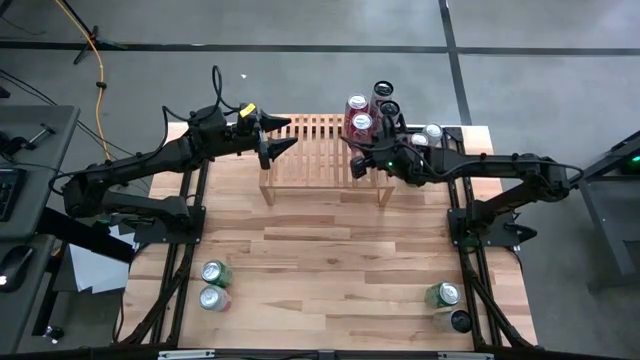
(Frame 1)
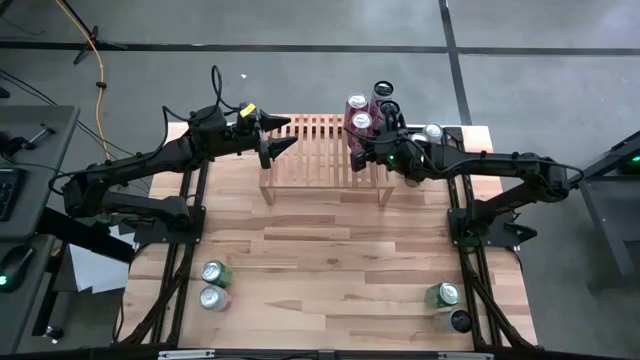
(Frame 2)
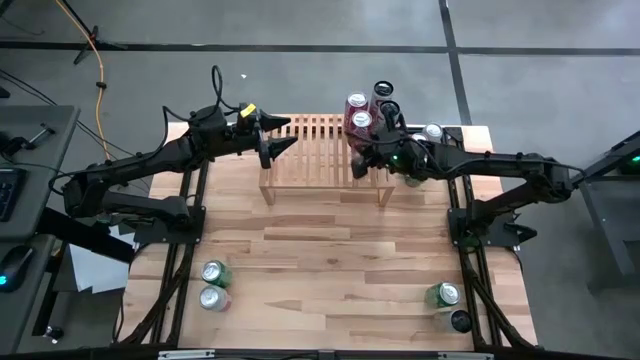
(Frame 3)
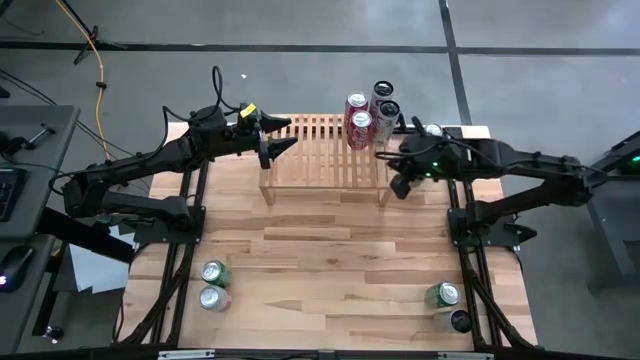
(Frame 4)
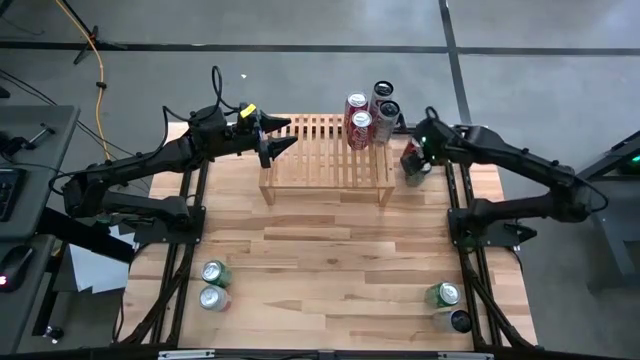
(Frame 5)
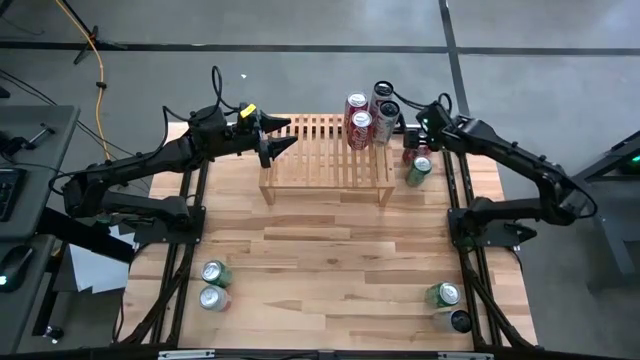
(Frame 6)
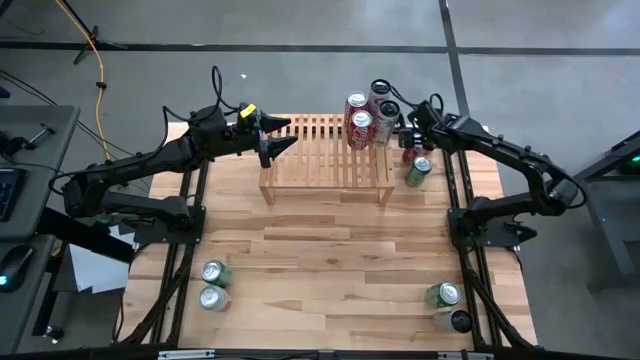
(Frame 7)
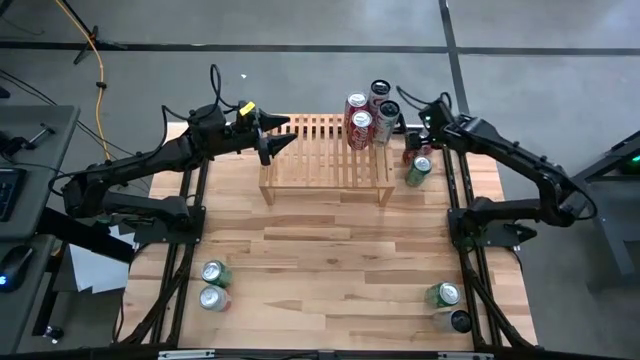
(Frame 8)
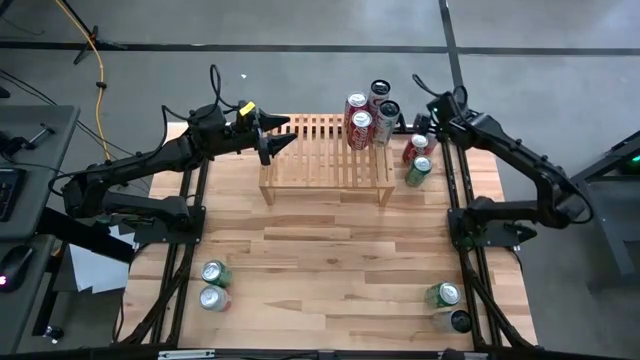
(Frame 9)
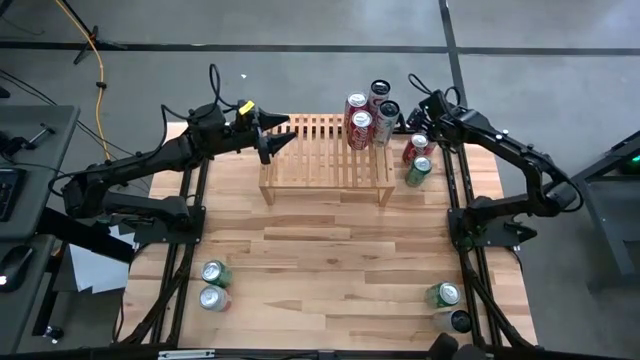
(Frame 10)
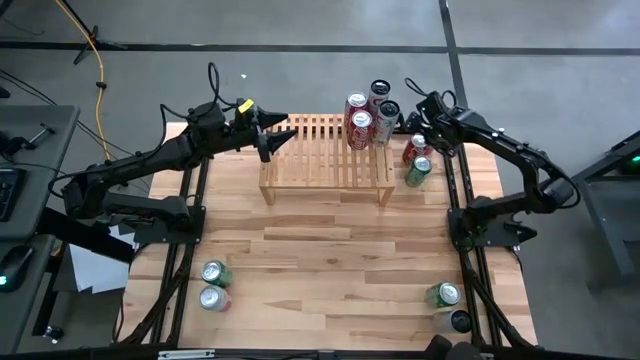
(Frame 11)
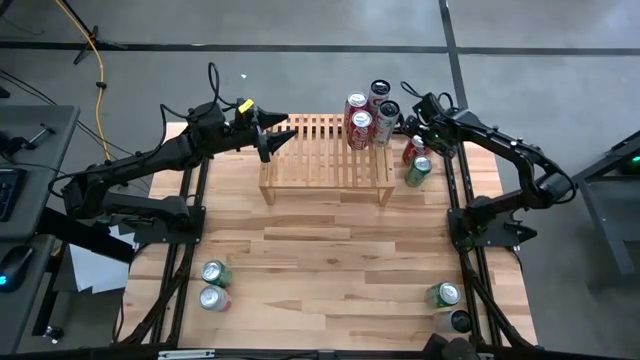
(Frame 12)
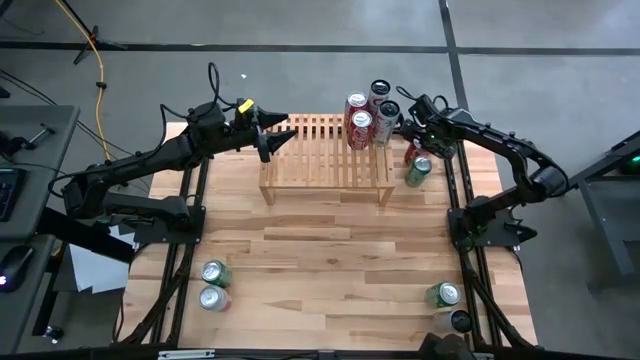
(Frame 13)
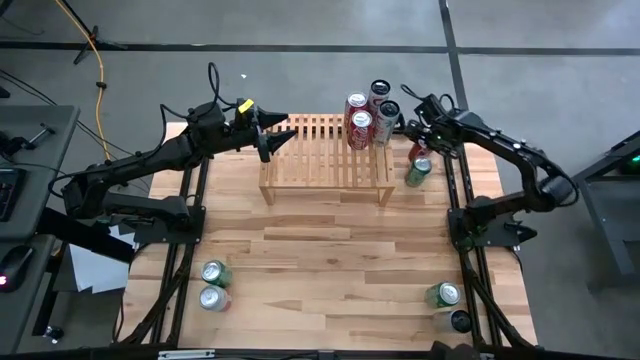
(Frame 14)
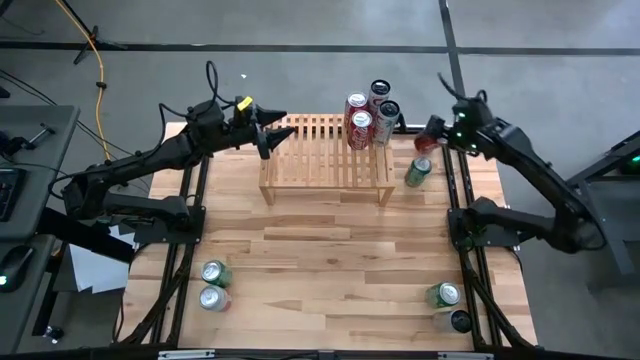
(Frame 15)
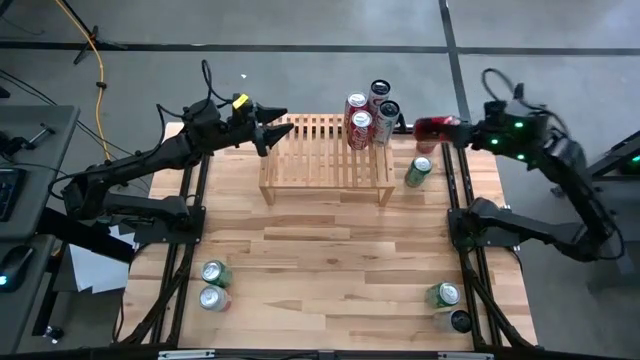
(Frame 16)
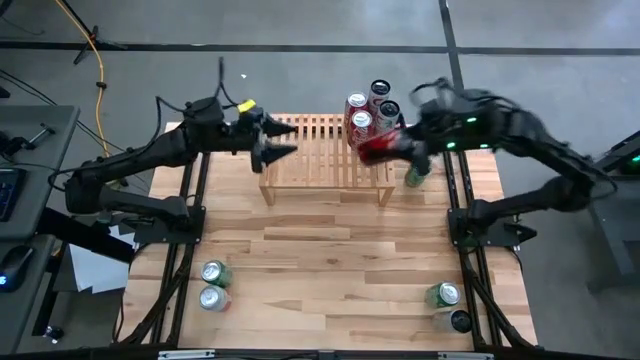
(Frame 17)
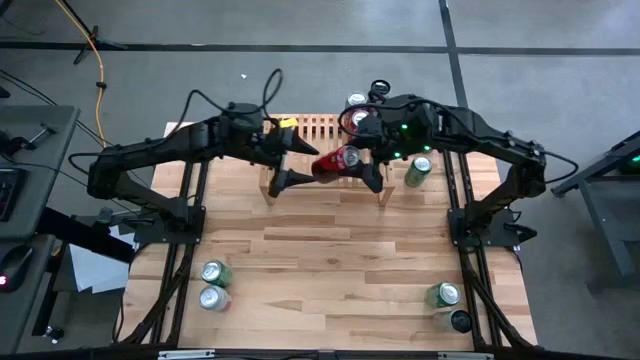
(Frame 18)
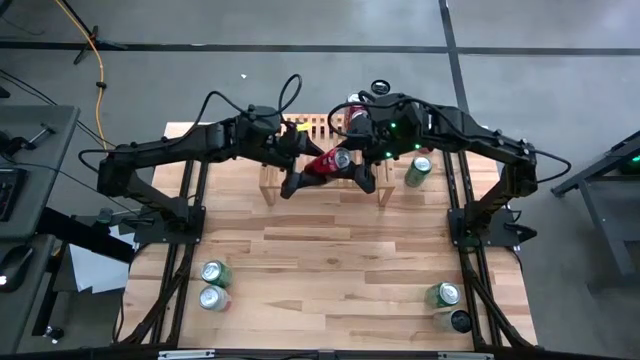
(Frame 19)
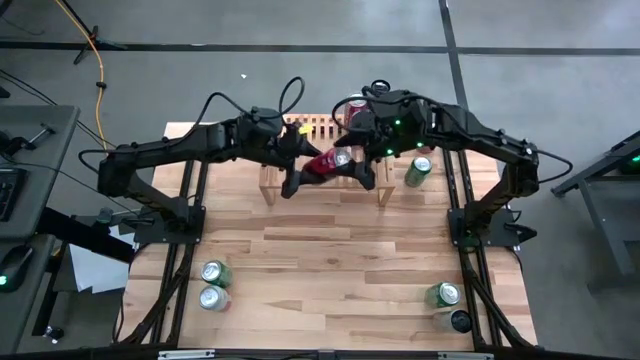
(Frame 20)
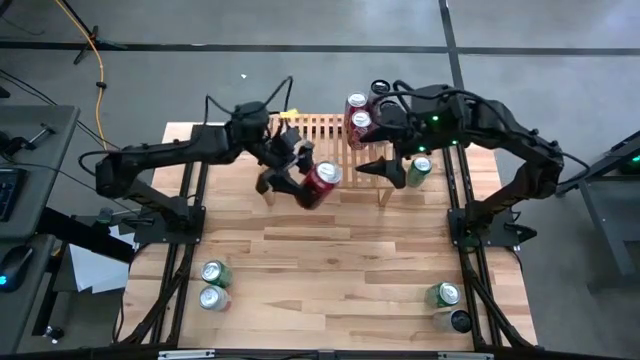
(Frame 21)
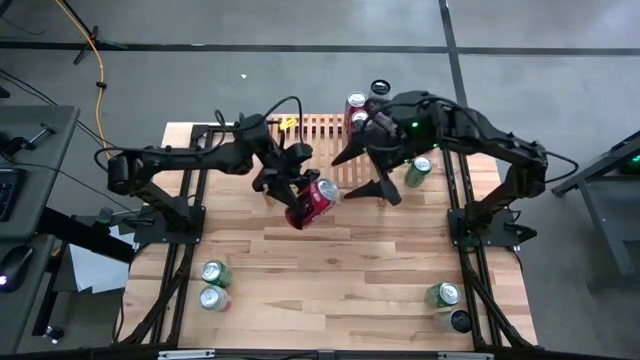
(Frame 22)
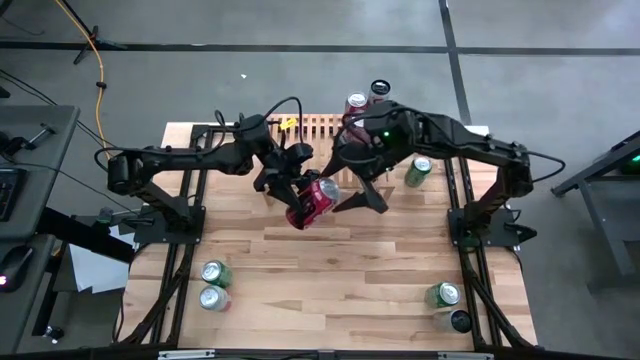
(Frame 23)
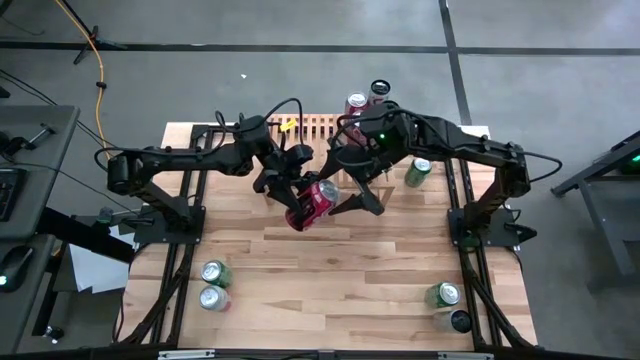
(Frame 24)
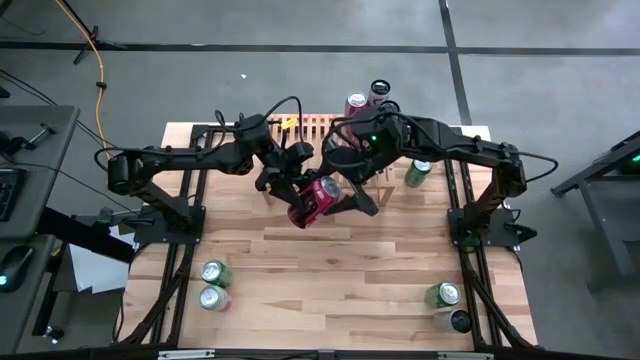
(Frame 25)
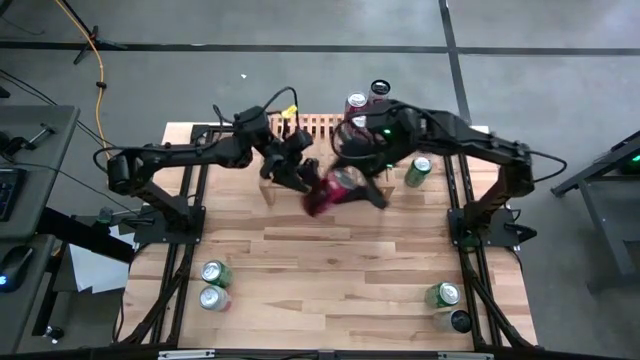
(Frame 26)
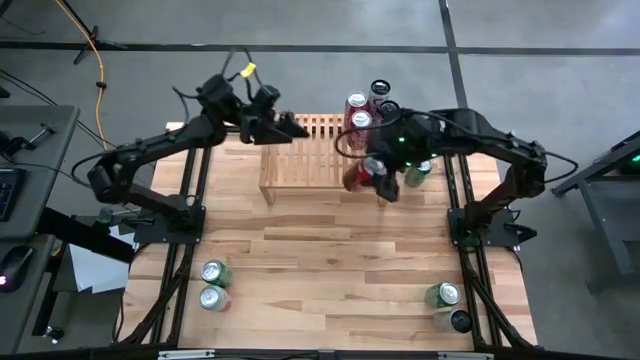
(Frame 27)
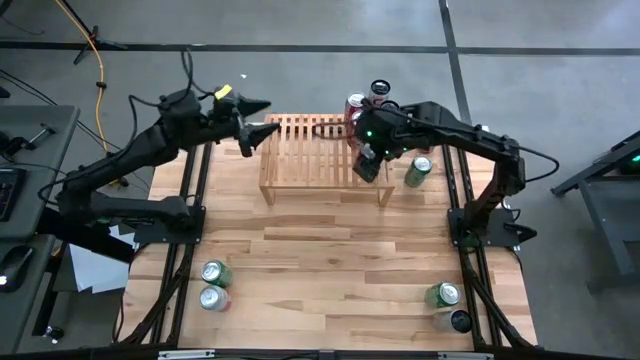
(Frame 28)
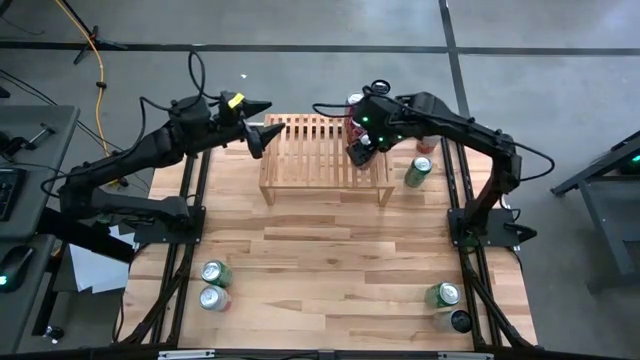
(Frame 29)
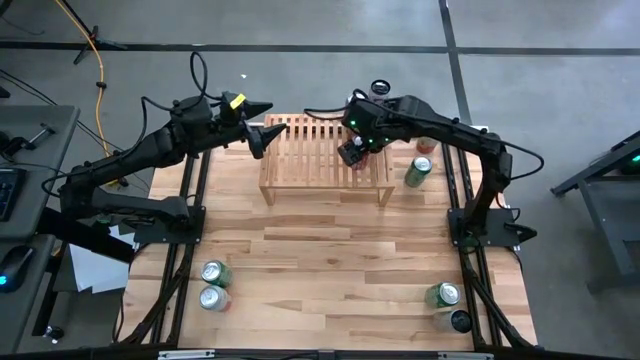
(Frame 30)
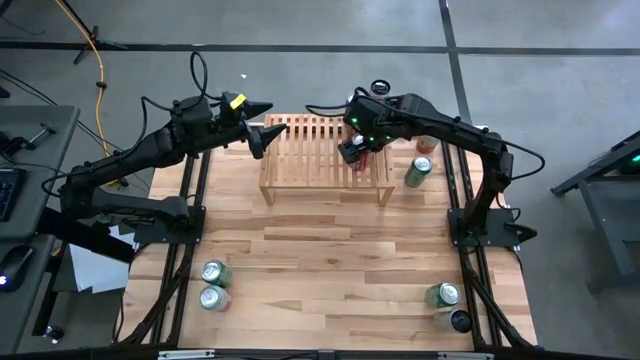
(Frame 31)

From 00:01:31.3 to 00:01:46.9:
Task: Place canned beverage on shelf
Put the red white soda can on the shelf aligned with the other red white soda cans

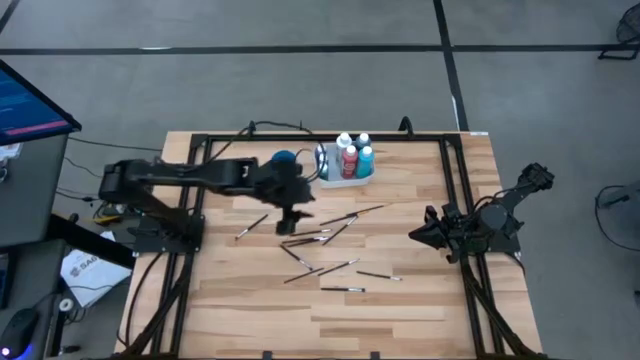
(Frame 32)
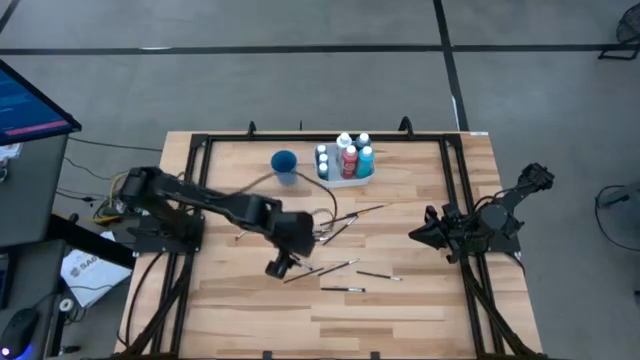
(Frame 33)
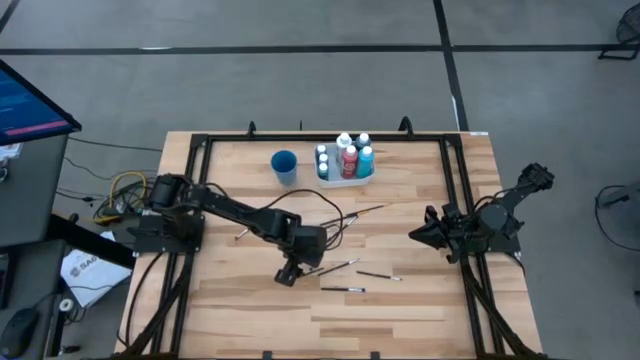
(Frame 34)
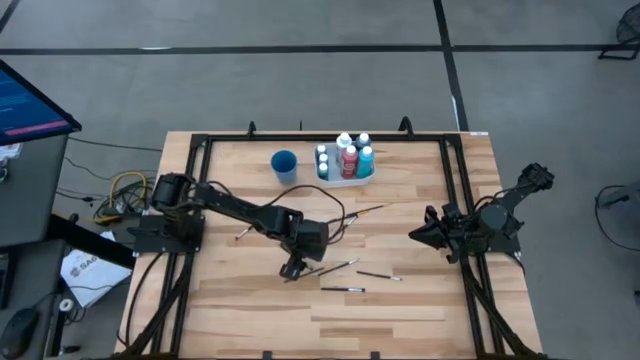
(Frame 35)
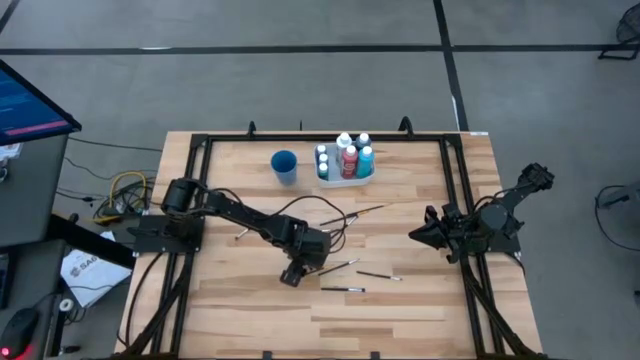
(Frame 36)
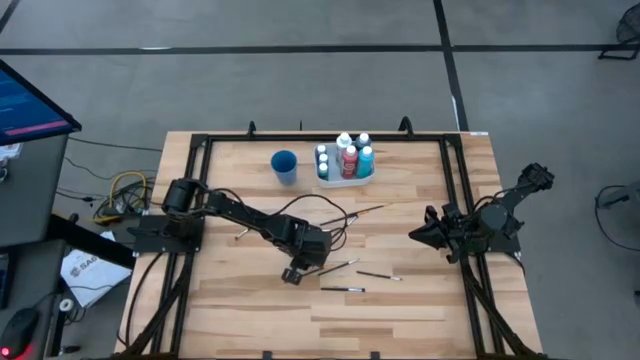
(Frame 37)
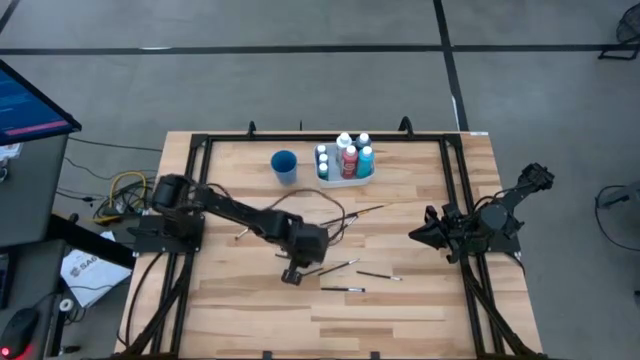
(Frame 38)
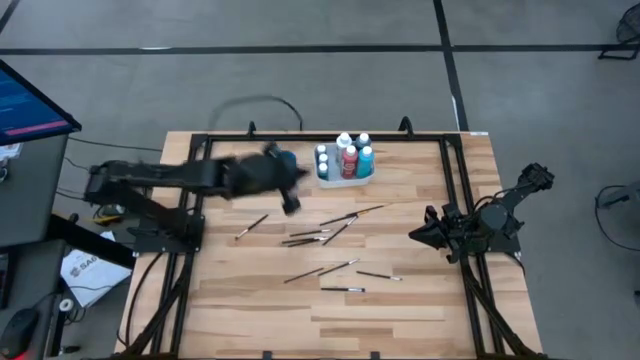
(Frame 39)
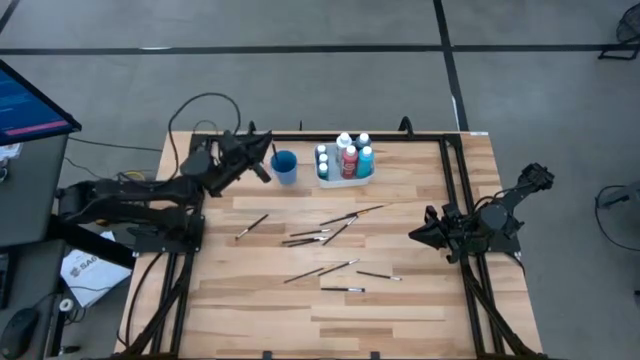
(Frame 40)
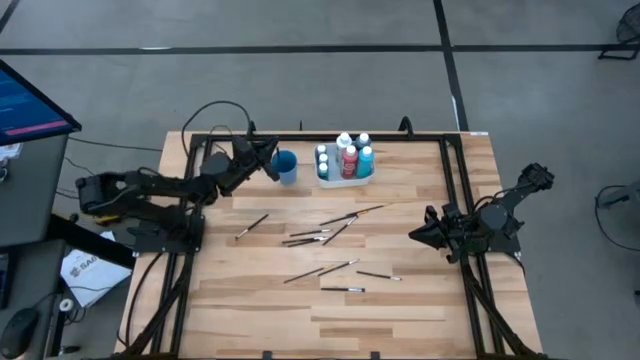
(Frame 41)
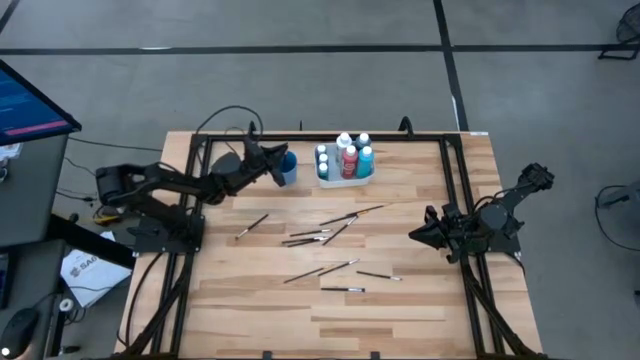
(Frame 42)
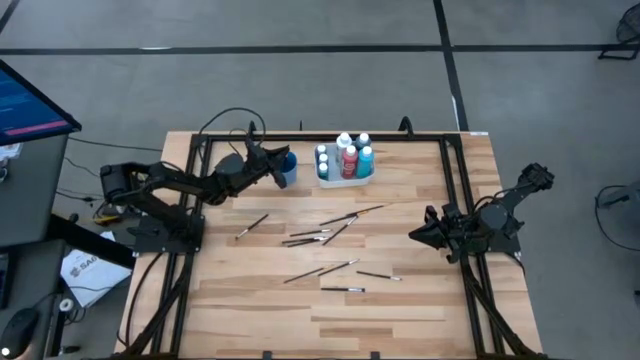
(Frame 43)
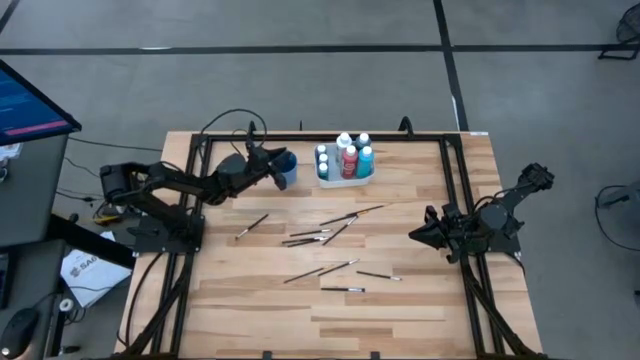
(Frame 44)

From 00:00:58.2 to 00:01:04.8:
Task: Pick & Place Paint Supplies
Put the silver and black paint brush into the blue cup
